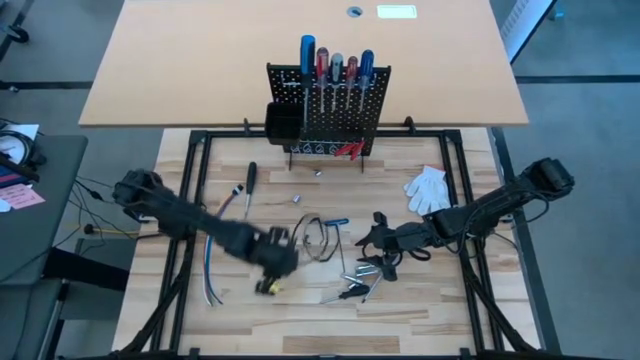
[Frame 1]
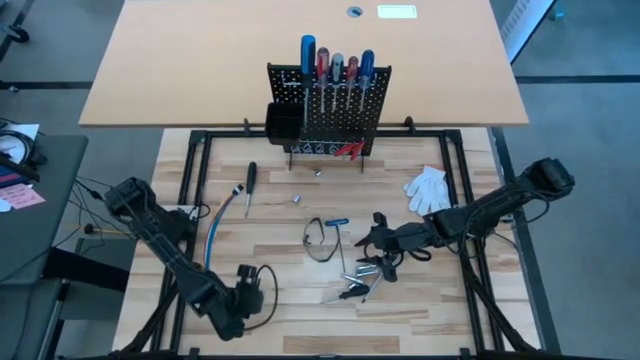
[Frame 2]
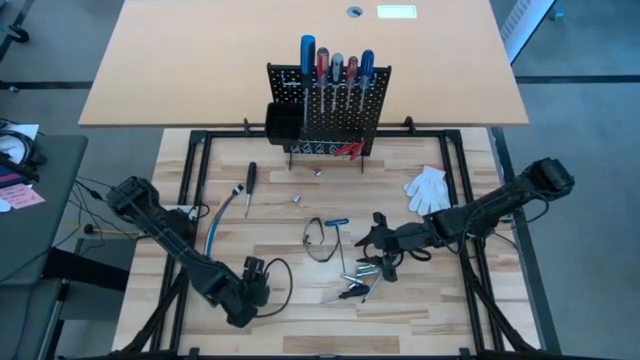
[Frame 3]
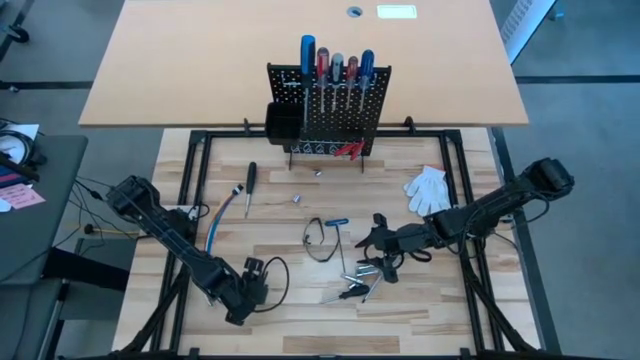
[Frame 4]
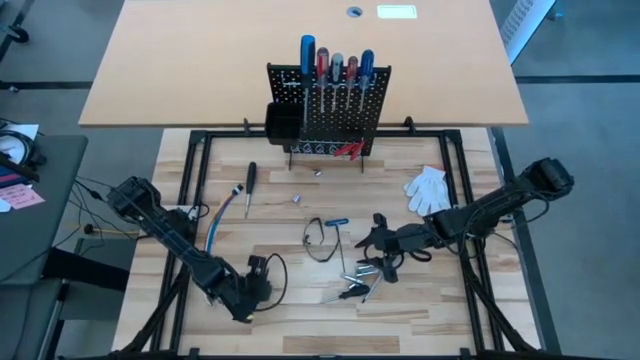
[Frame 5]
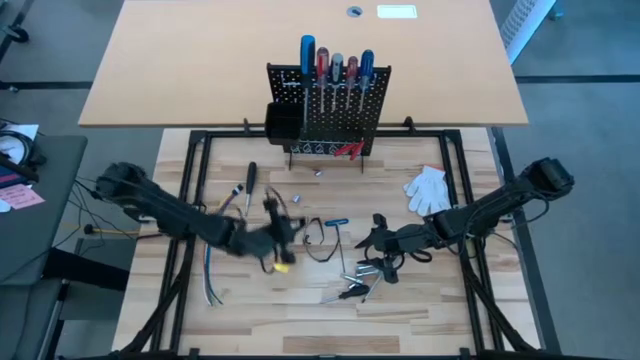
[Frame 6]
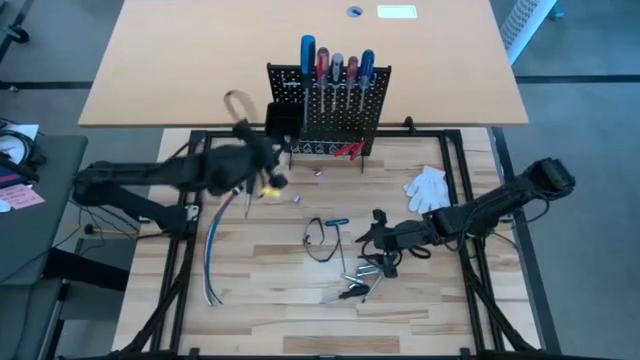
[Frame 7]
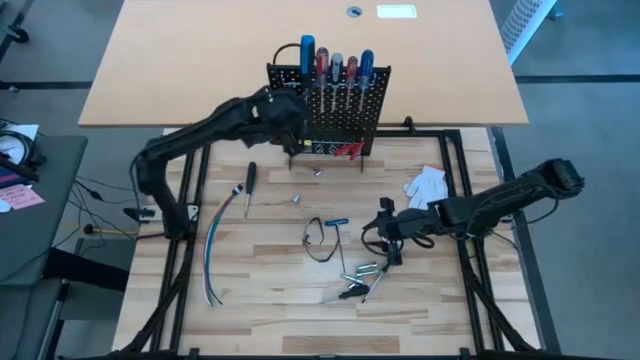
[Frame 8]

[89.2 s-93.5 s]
Task: Hang tools onto peg board
Put the silver socket into the black bin on the black pegboard

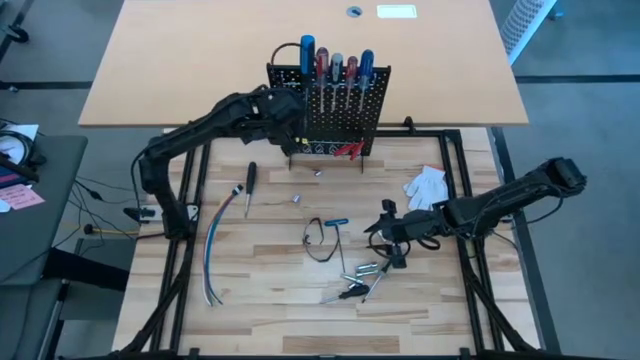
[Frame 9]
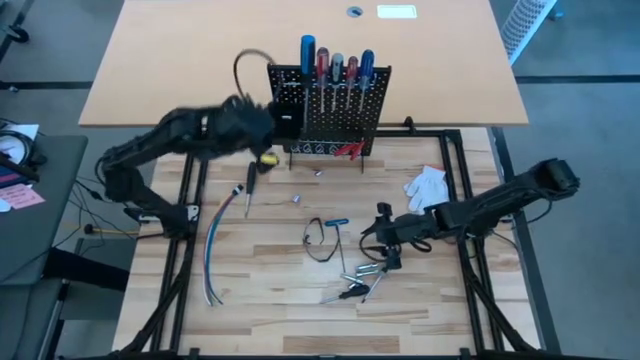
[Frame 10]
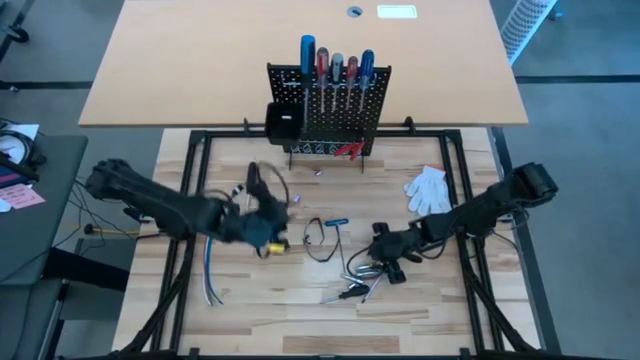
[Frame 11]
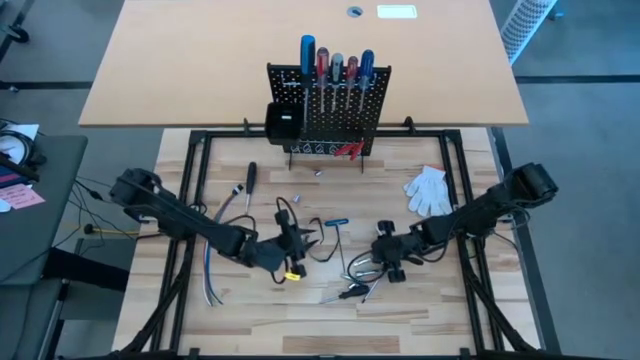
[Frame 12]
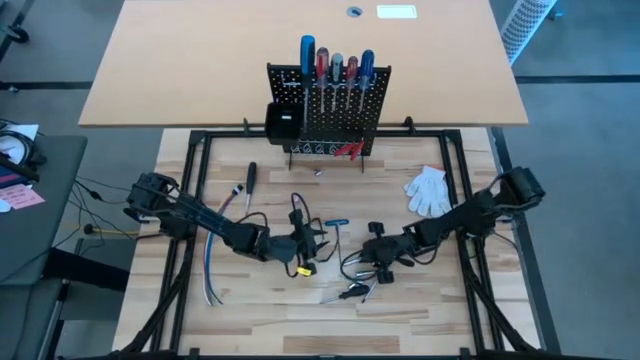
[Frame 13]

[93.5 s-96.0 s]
Put the silver extension bar into the black bin on the black pegboard

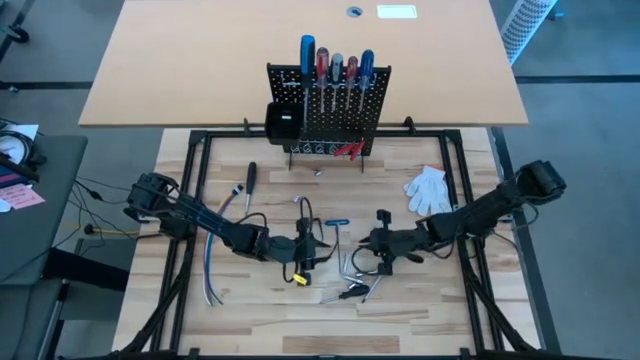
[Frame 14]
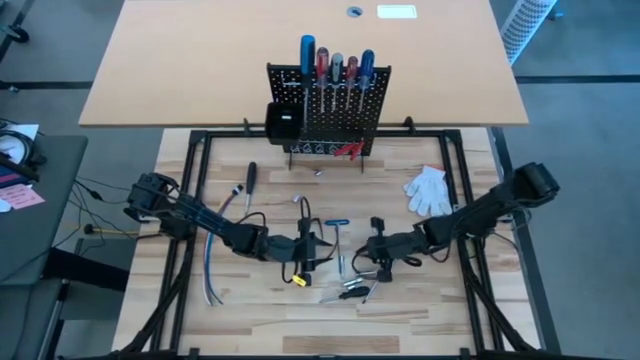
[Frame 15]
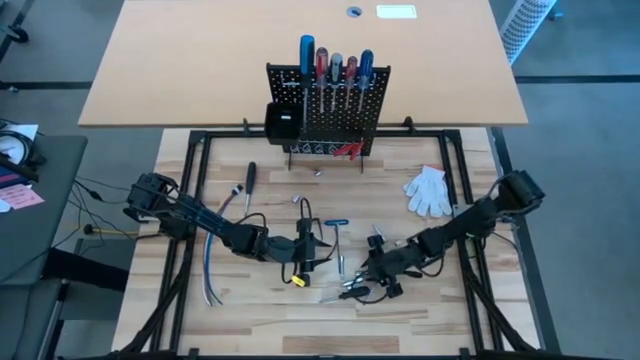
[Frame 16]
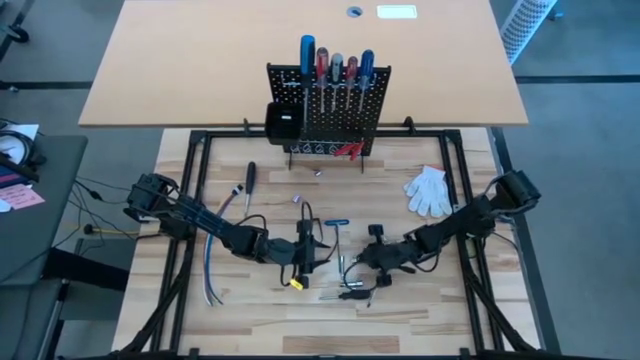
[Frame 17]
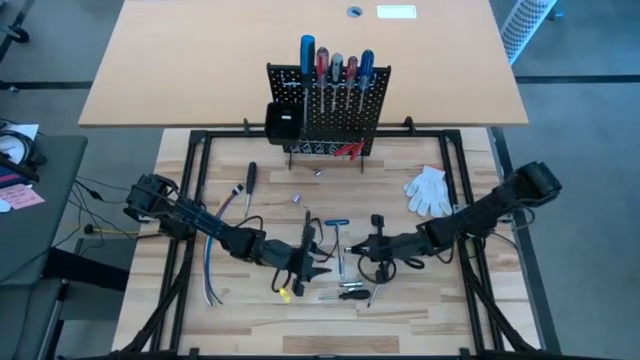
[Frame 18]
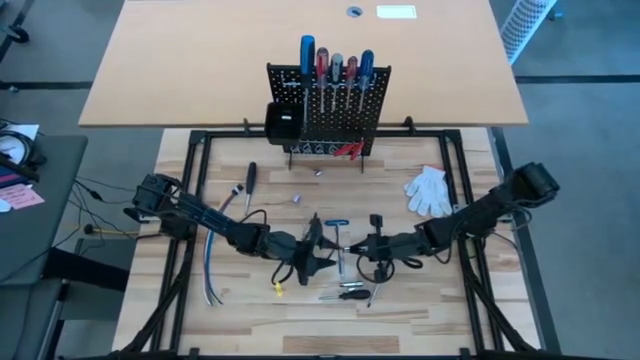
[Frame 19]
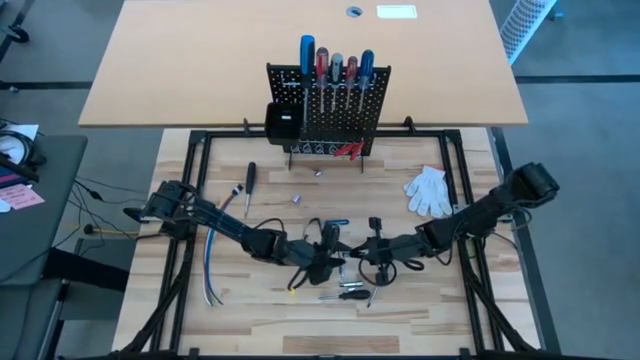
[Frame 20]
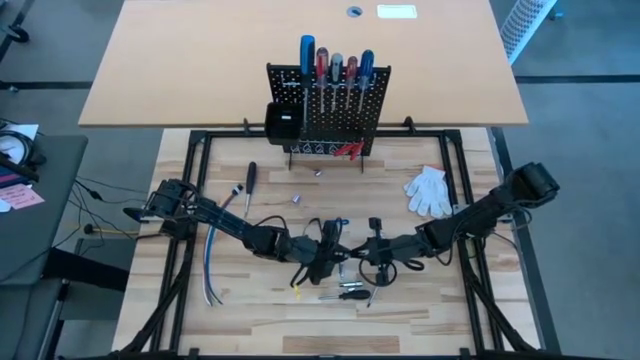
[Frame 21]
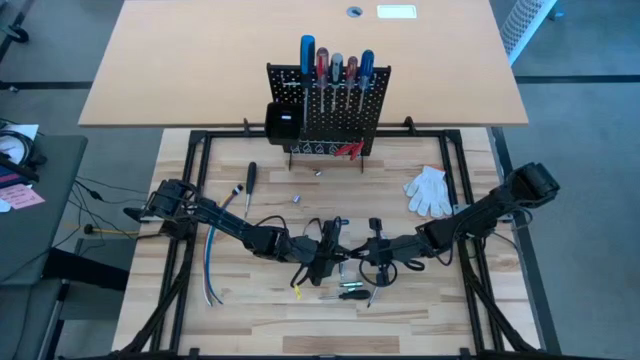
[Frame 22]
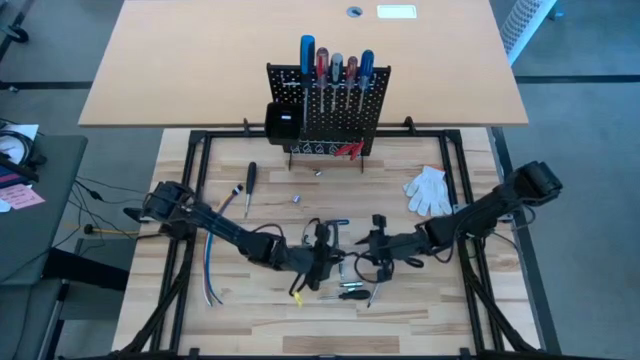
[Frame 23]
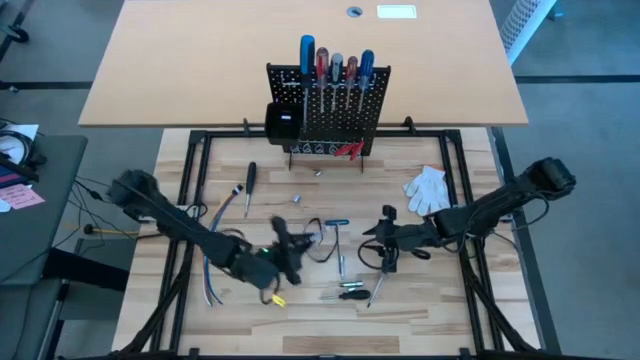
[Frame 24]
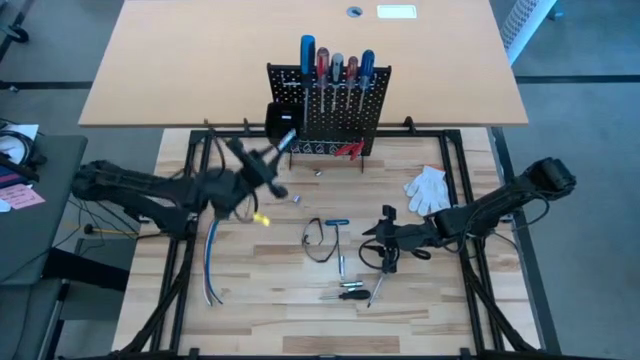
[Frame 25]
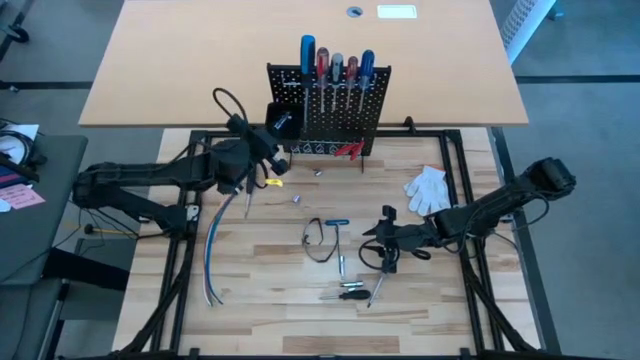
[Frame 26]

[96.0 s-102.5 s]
Put the silver extension bar into the black bin on the black pegboard

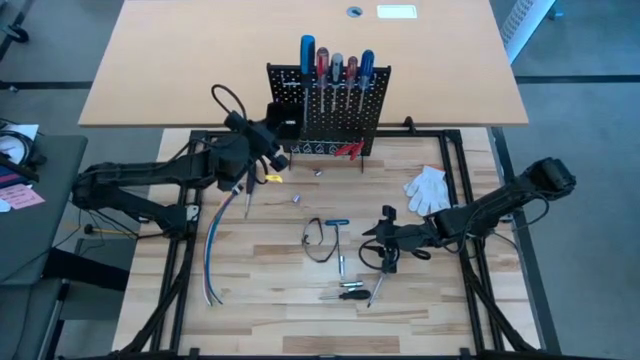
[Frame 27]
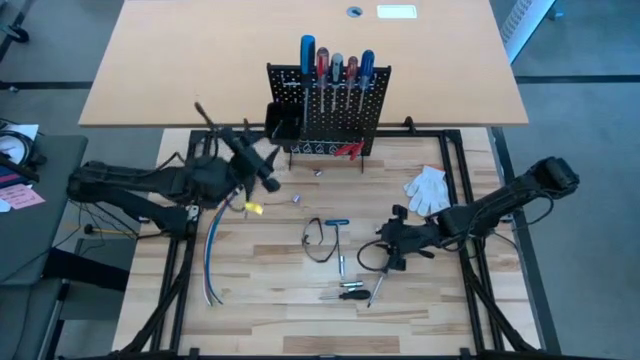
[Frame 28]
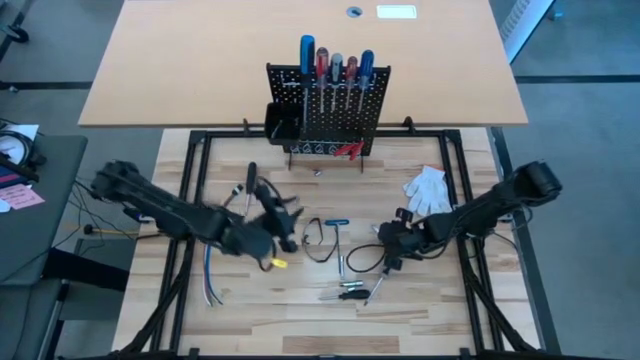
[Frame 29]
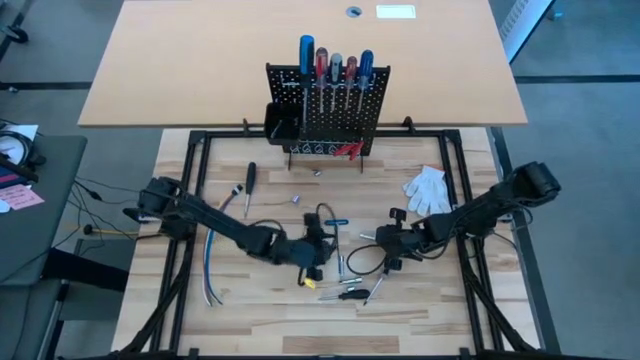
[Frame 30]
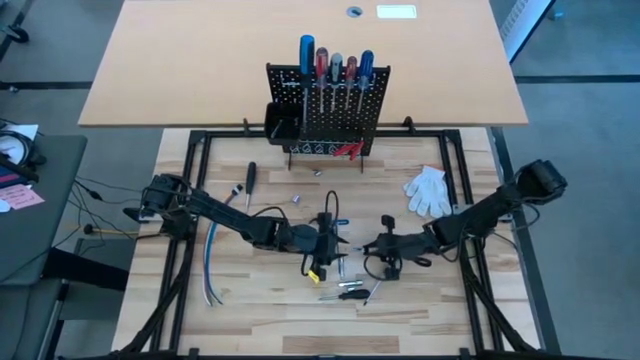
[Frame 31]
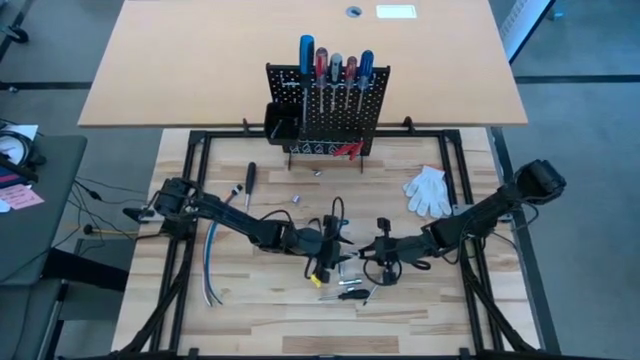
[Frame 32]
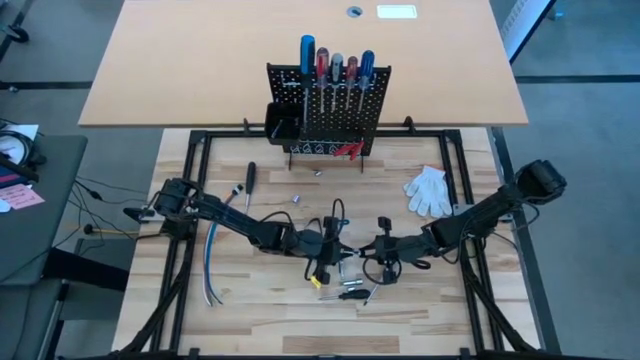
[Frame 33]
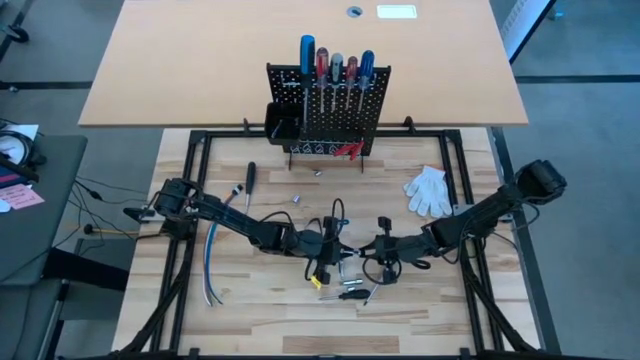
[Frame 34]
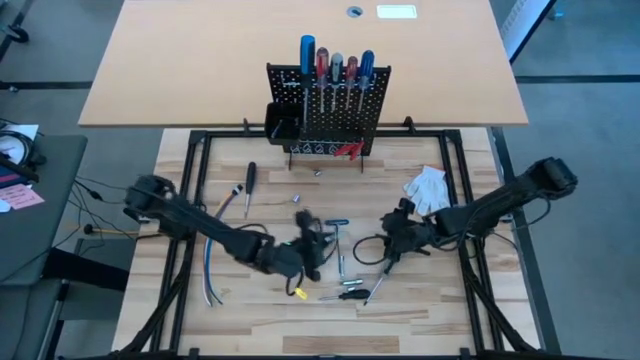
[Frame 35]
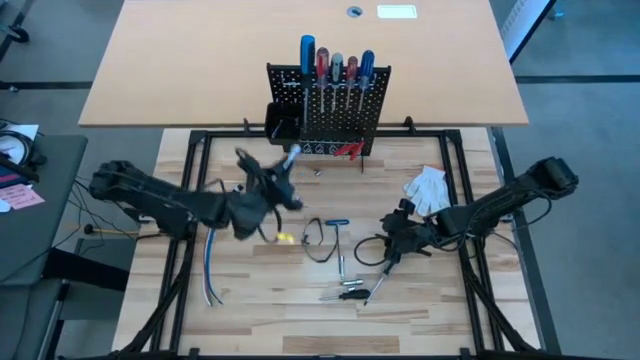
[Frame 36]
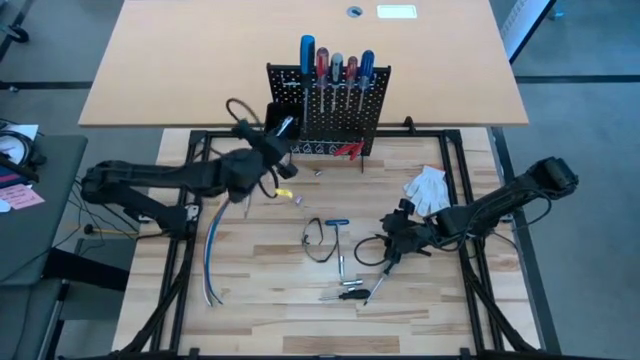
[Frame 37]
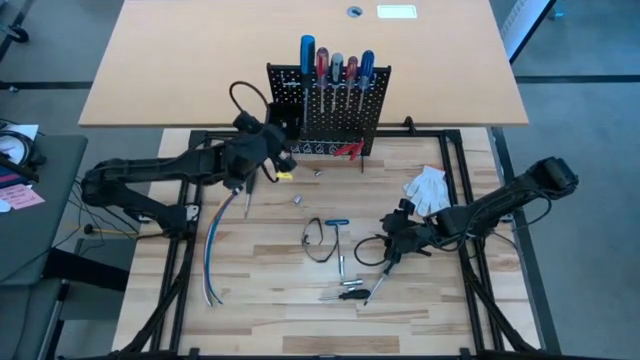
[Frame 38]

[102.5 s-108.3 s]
Put the silver extension bar into the black bin on the black pegboard

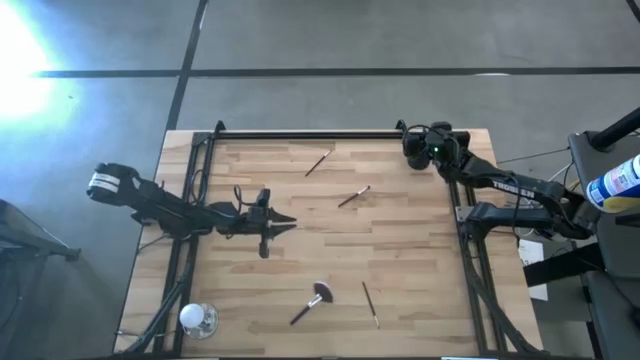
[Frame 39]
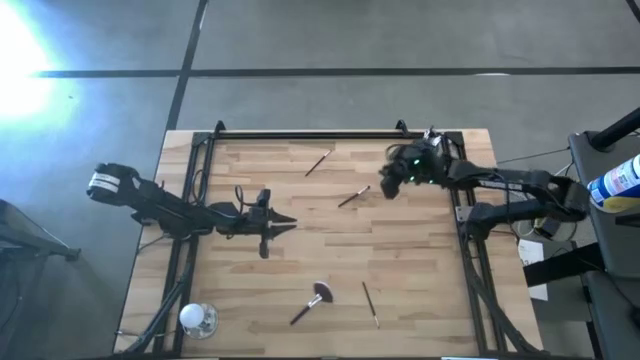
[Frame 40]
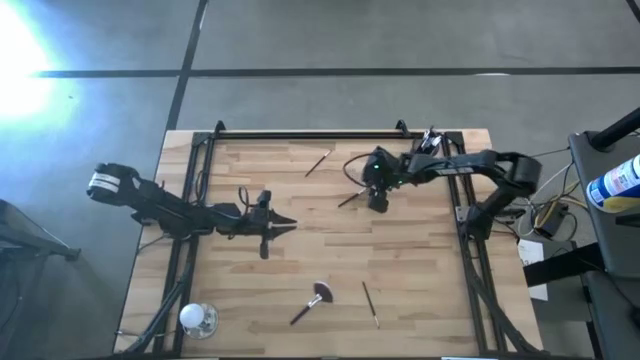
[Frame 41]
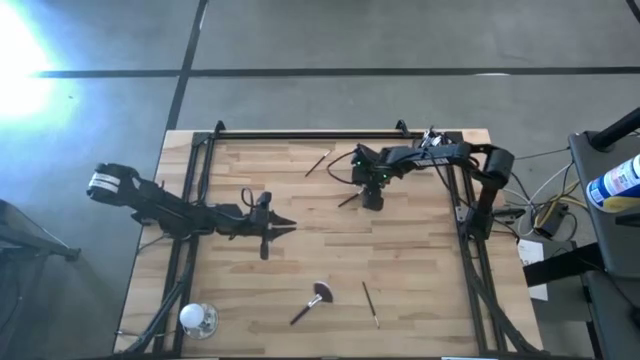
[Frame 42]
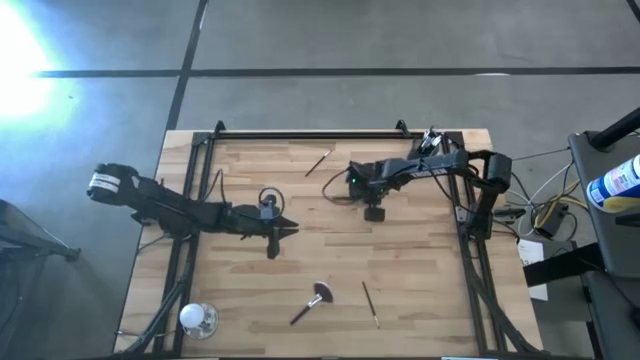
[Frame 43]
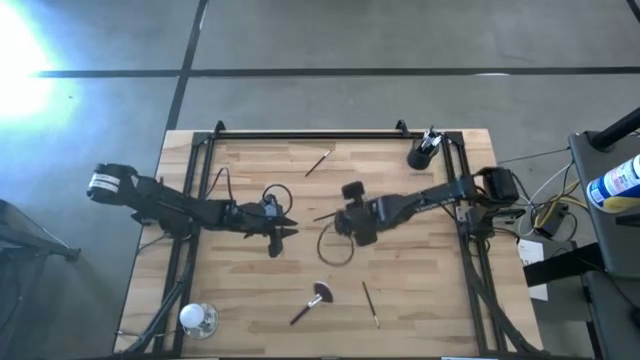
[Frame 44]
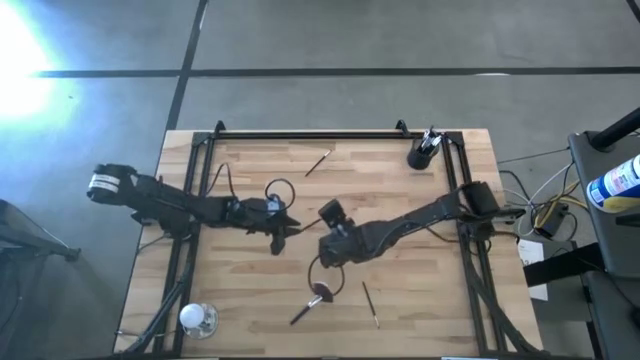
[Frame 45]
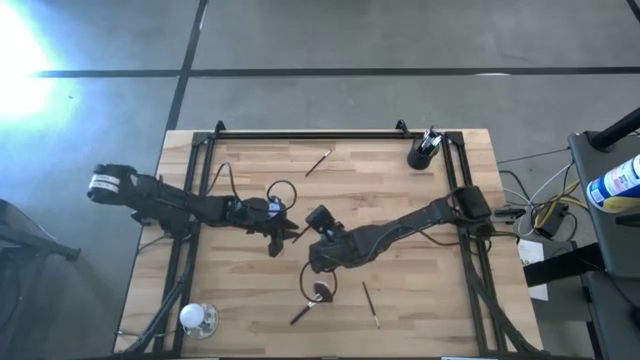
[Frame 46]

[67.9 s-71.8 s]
Task: Put items in baskets/containers
Put the eyeshadow brush into the pen holder
